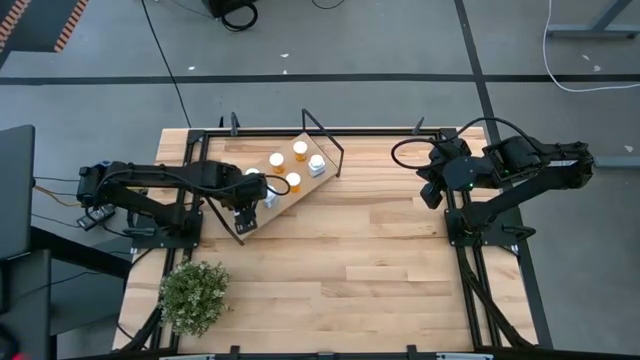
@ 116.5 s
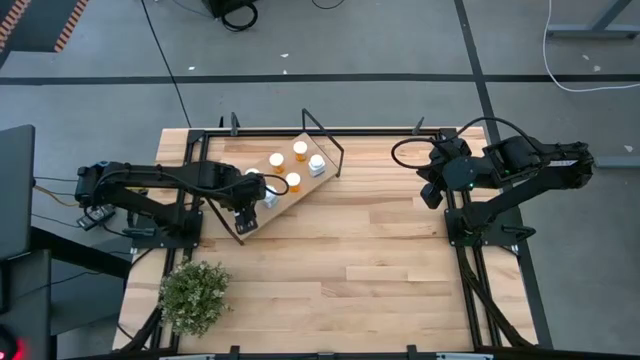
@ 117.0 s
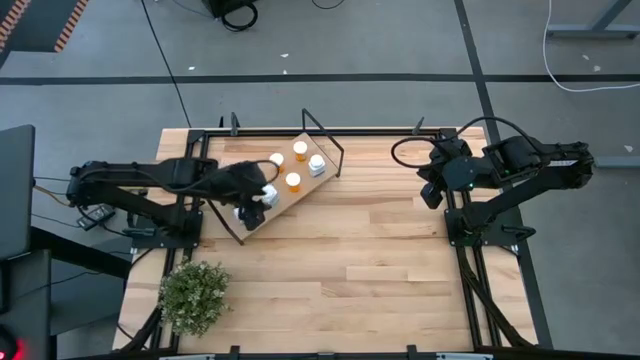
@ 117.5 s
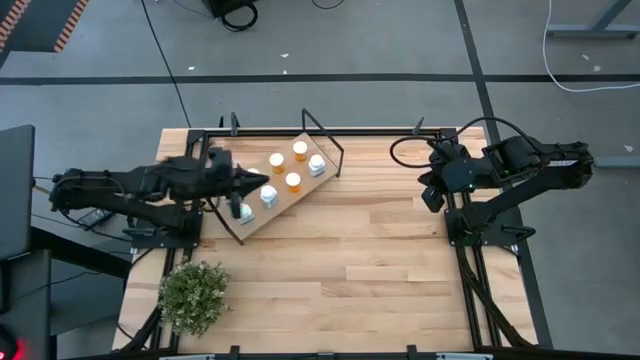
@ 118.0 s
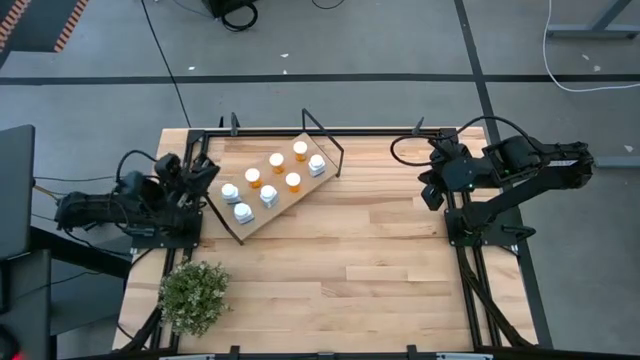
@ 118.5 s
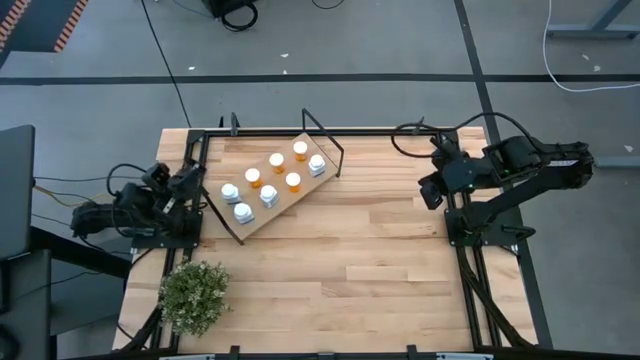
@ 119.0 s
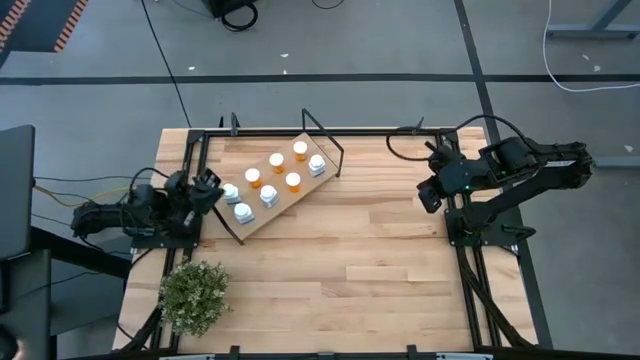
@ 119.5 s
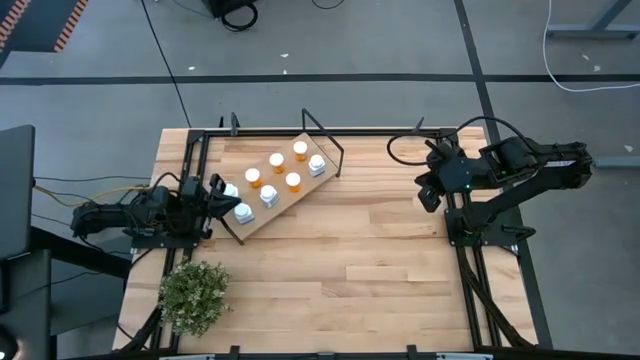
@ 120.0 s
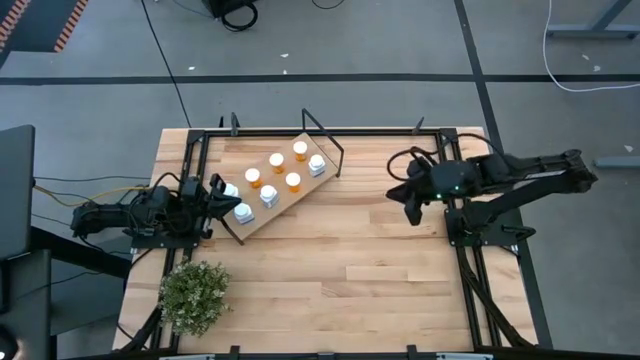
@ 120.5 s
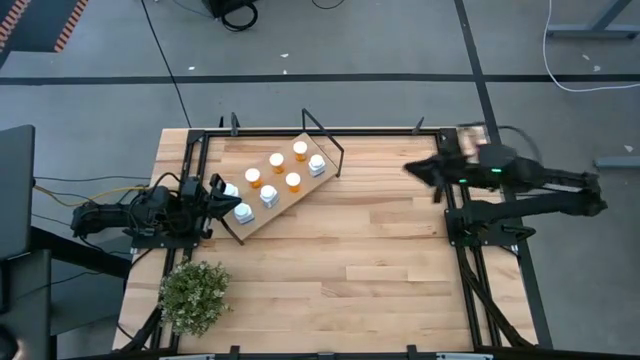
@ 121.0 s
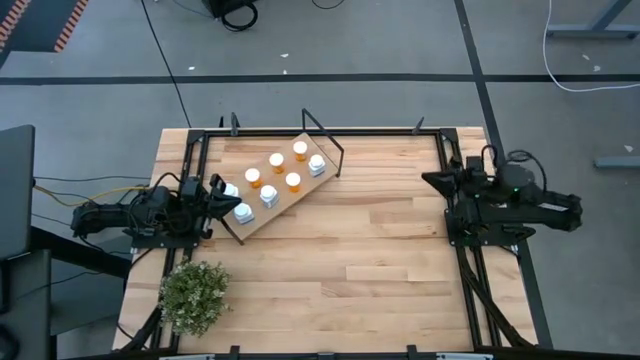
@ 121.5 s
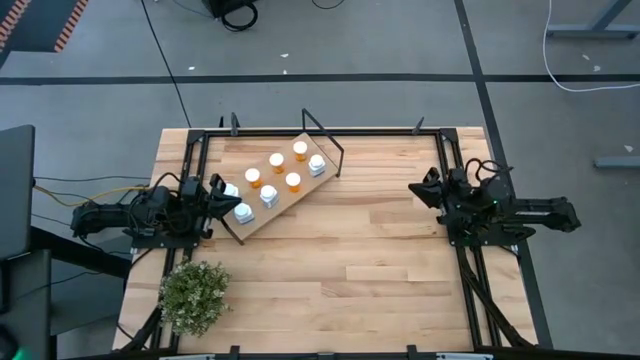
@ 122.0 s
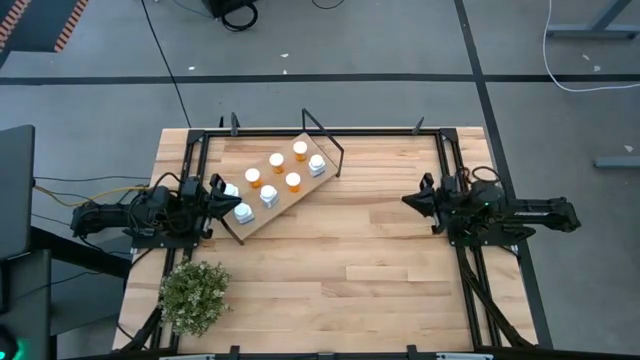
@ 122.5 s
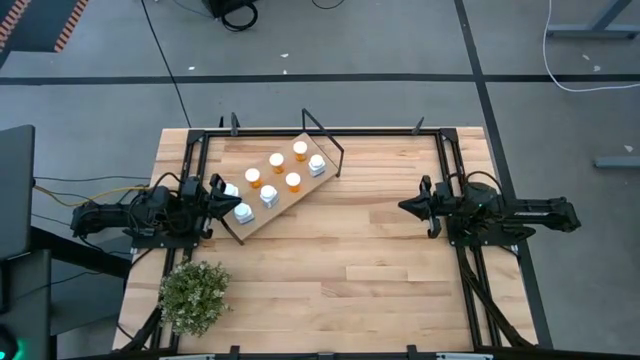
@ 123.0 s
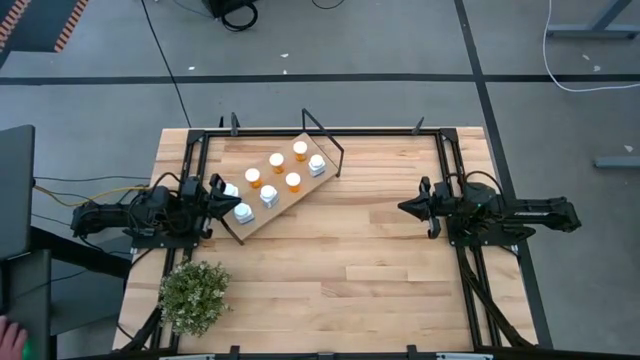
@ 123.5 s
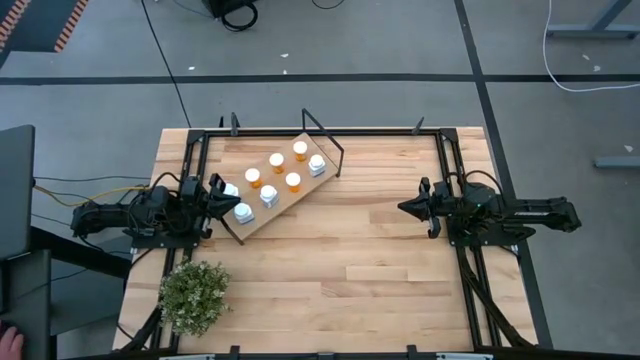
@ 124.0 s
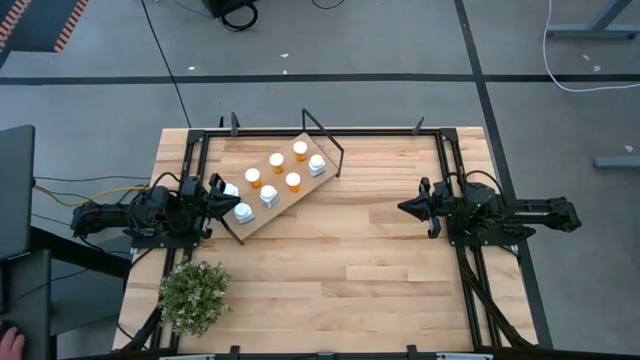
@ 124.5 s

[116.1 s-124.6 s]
Task: Pick and place medicine bottles onto shelf by color
Return To Home Position

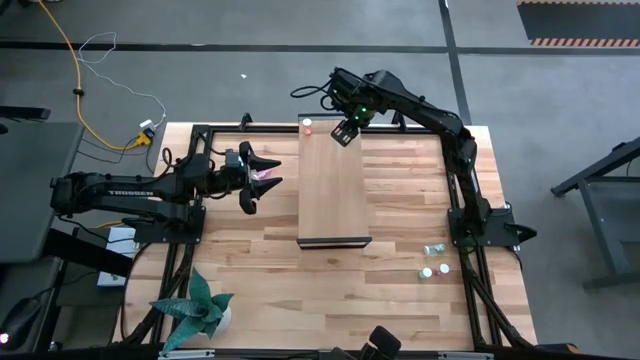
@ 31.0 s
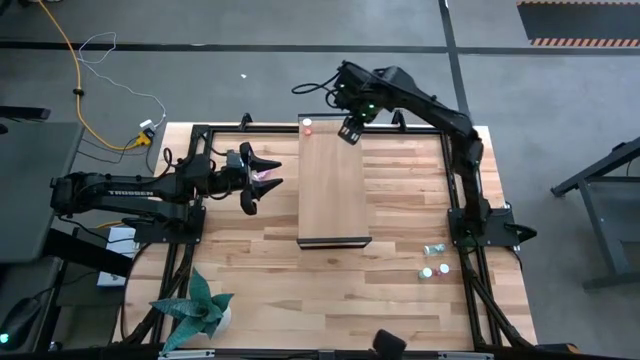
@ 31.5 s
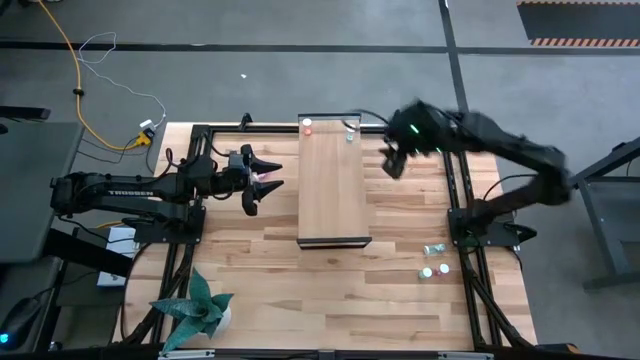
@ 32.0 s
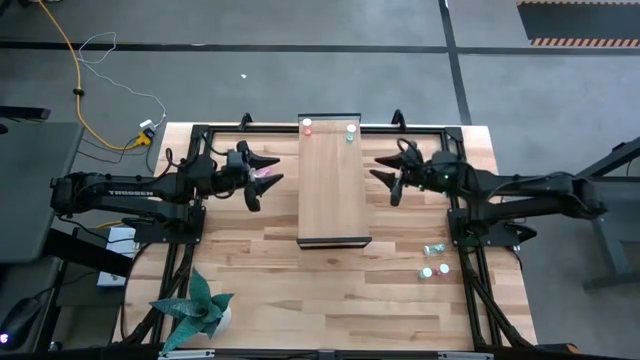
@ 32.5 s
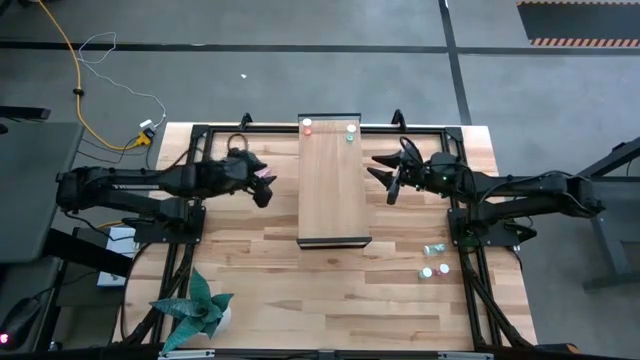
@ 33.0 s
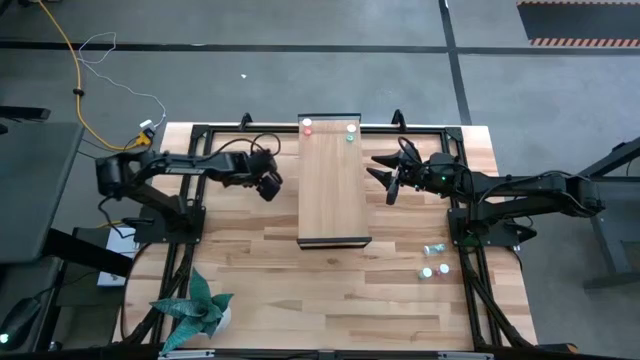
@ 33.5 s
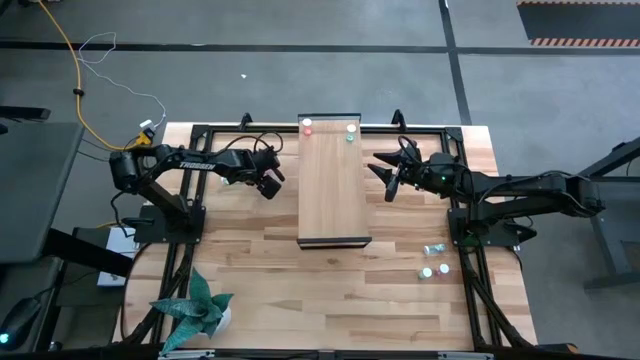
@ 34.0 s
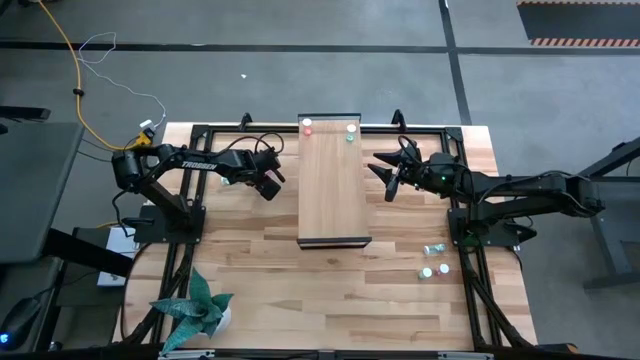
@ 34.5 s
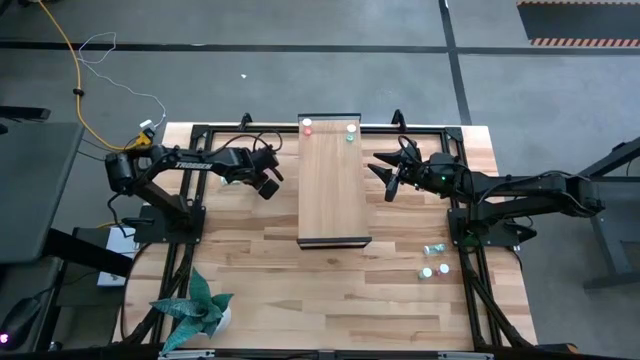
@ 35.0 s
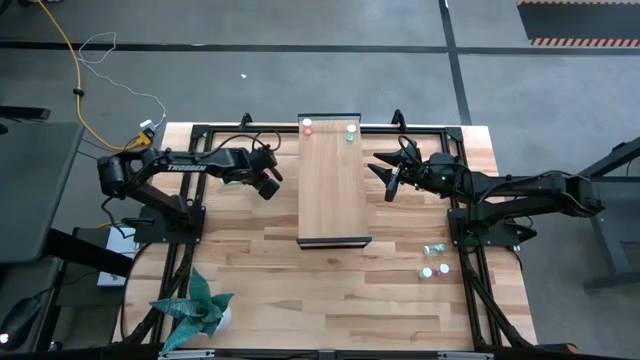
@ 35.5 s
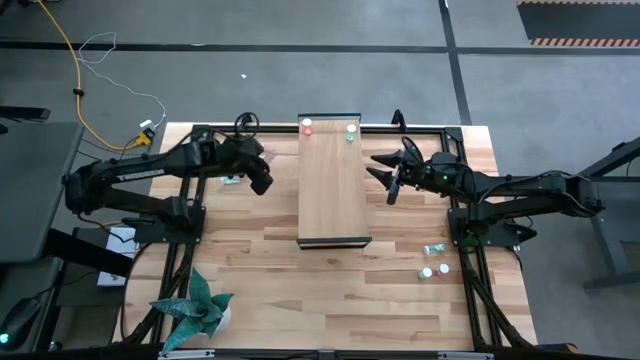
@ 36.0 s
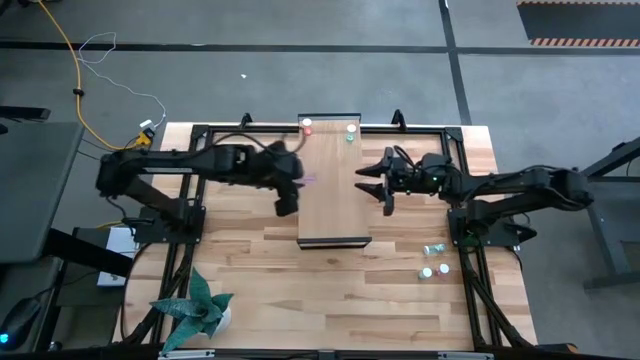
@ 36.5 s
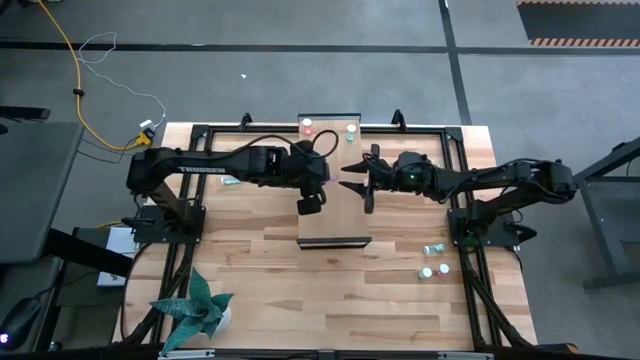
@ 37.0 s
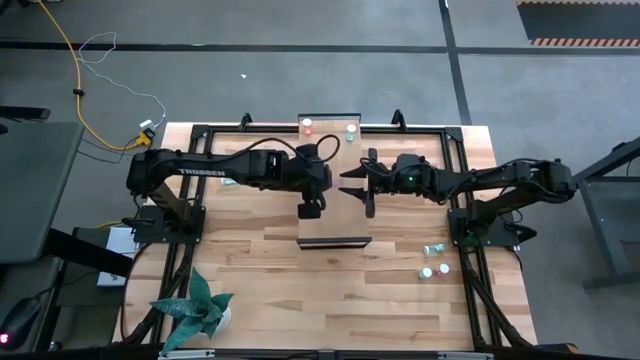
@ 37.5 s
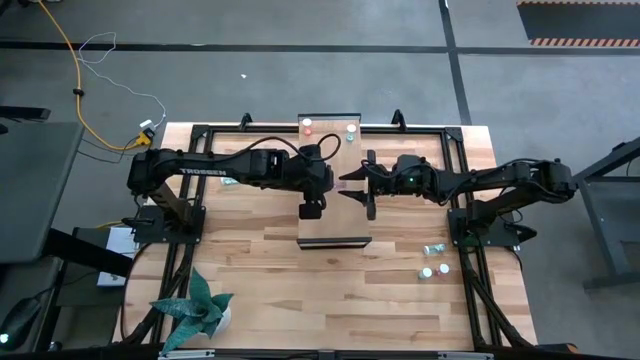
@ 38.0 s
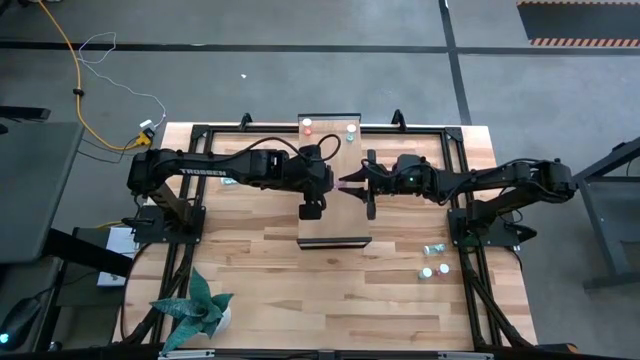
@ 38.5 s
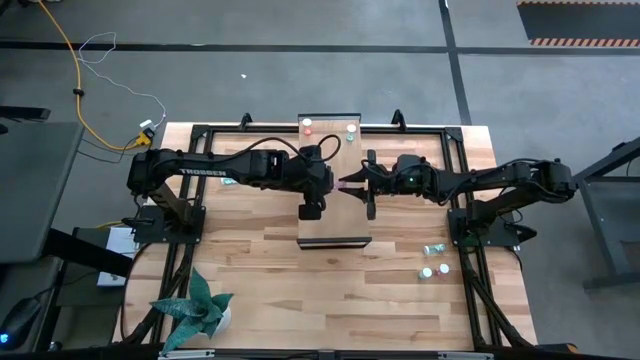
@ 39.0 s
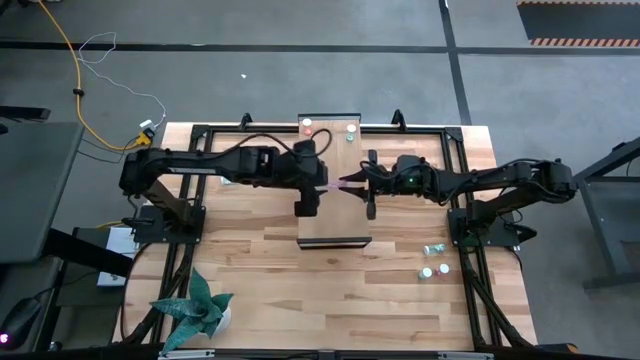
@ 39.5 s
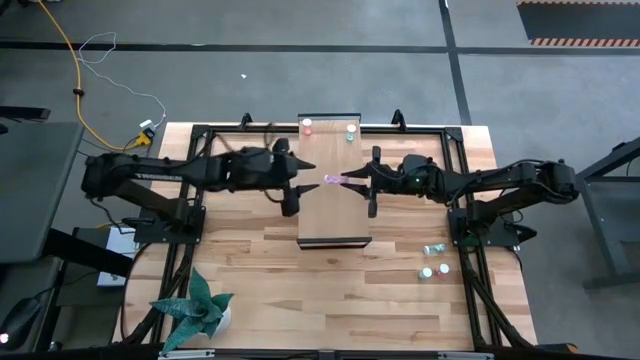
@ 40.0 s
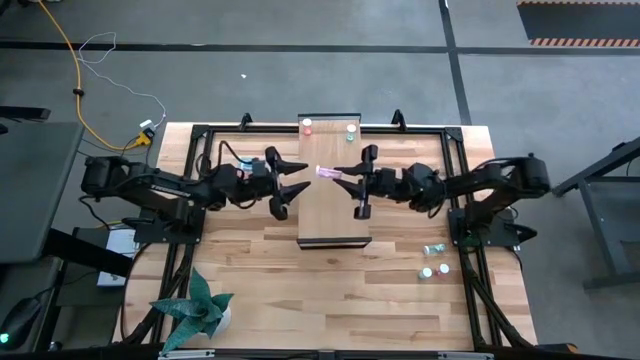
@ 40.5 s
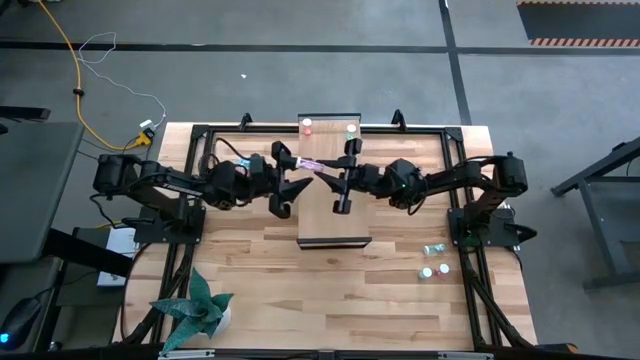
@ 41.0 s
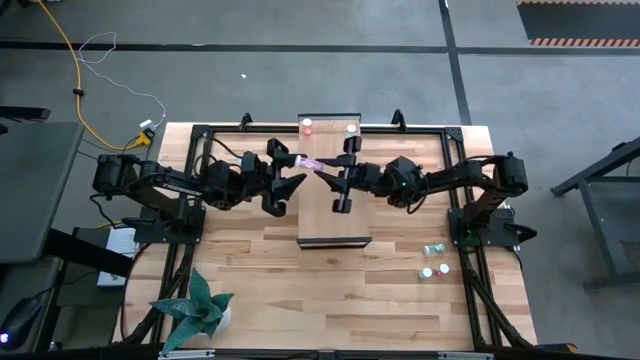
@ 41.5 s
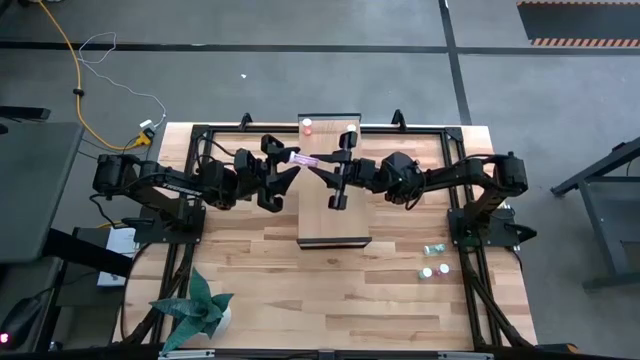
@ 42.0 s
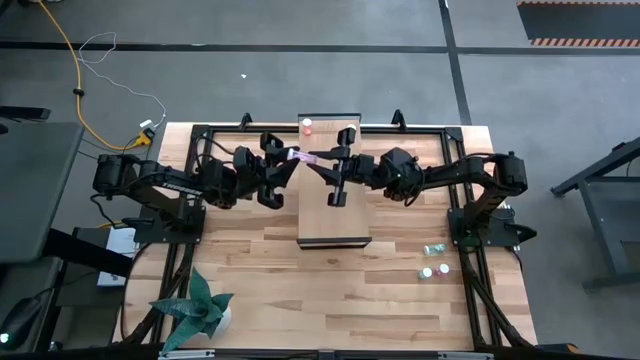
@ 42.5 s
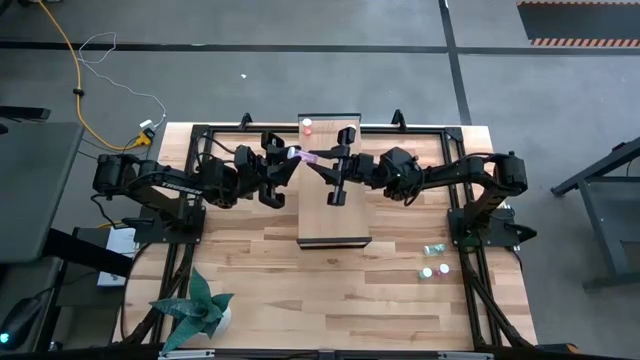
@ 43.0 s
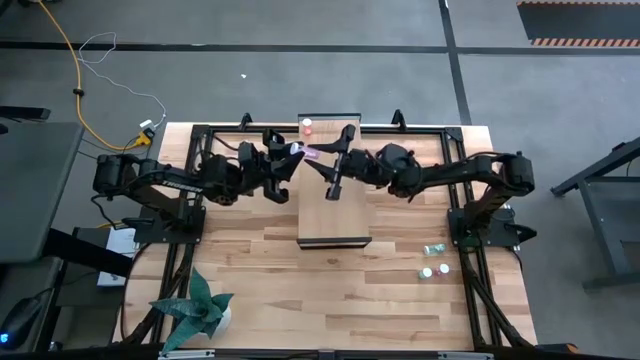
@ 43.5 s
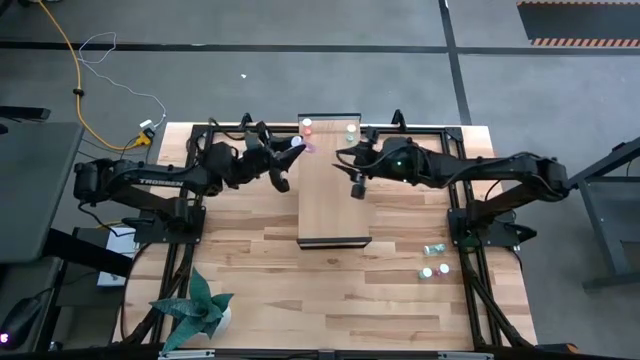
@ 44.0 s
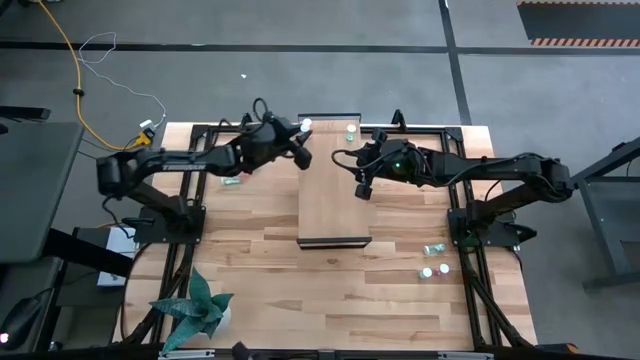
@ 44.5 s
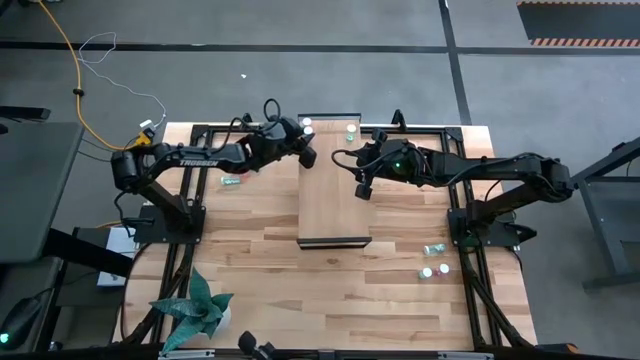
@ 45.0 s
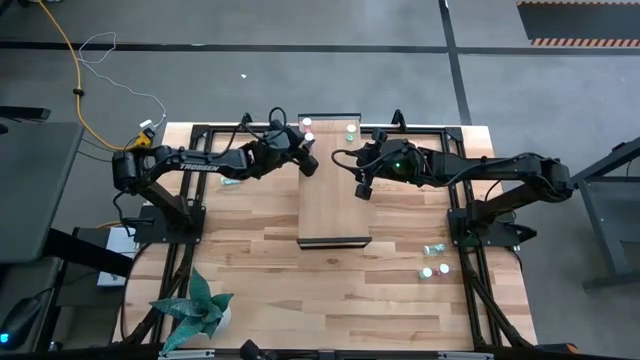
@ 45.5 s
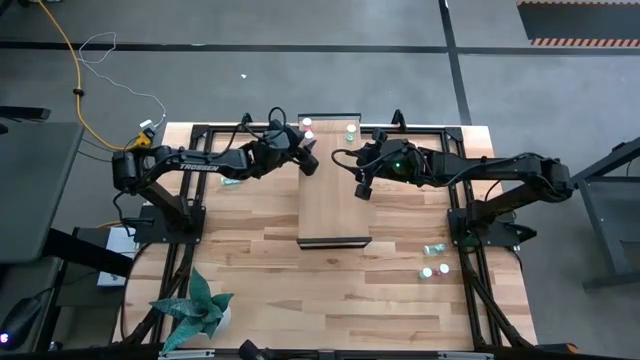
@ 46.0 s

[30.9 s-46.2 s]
Task: Pick and place medicine bottles onto shelf by color
Put the transparent pink pill bottle on the shelf
